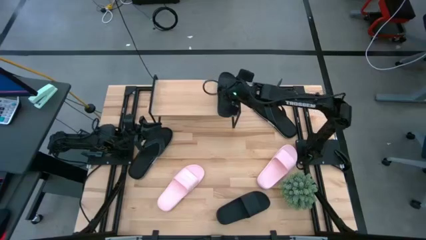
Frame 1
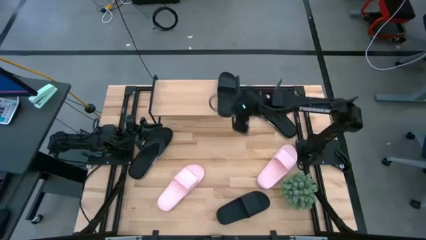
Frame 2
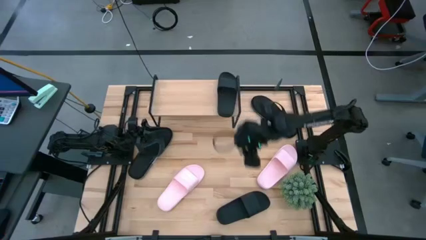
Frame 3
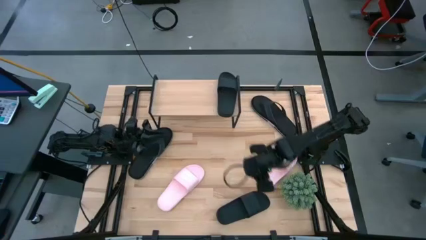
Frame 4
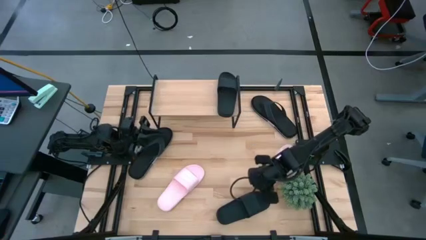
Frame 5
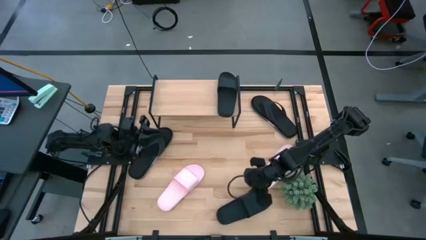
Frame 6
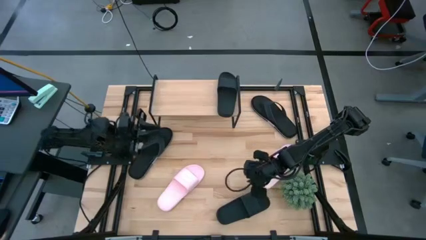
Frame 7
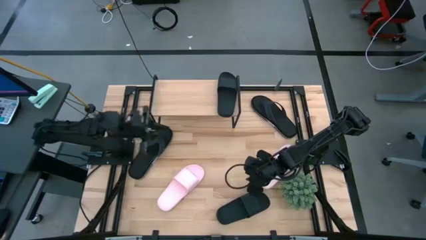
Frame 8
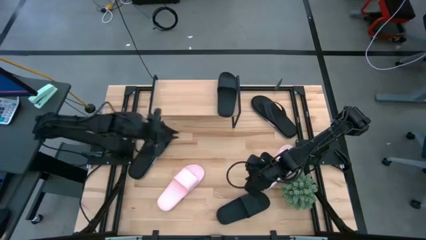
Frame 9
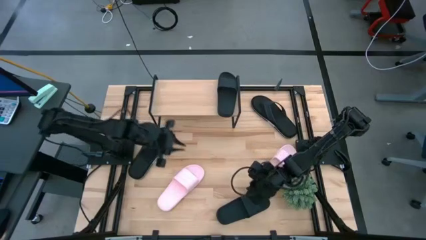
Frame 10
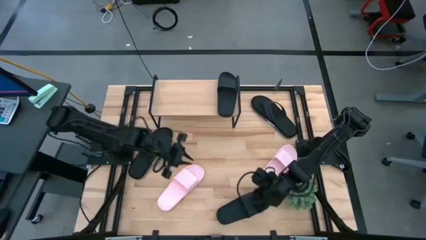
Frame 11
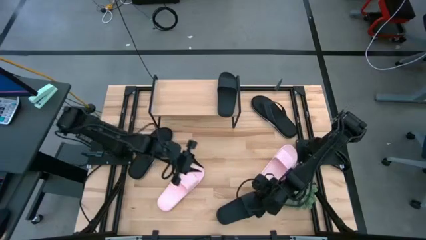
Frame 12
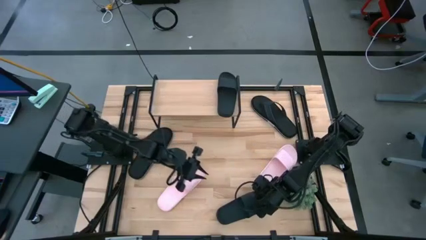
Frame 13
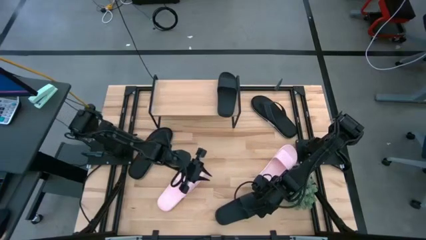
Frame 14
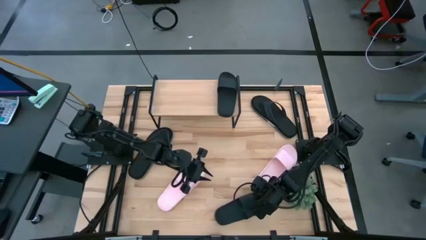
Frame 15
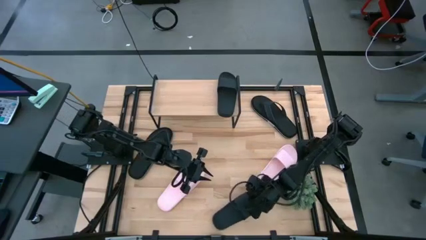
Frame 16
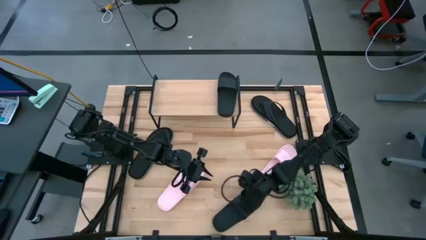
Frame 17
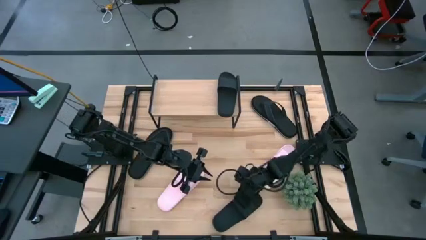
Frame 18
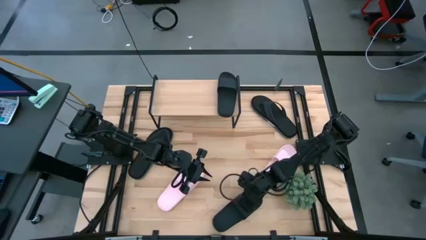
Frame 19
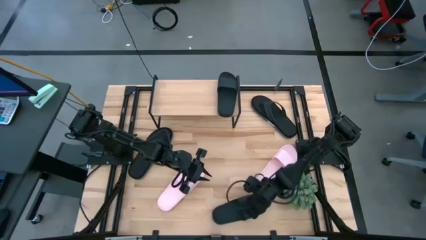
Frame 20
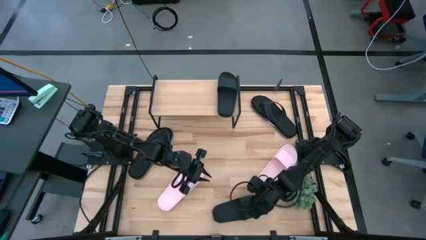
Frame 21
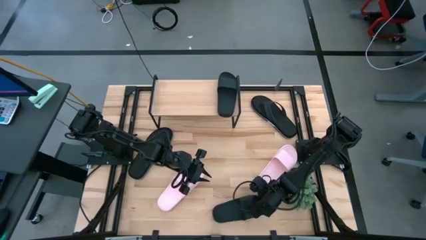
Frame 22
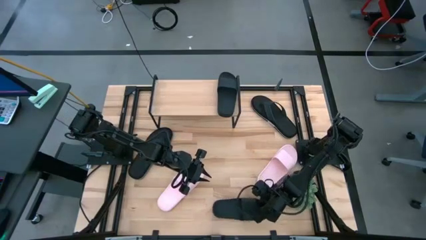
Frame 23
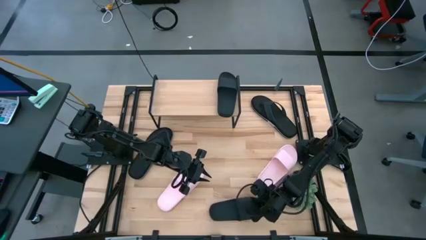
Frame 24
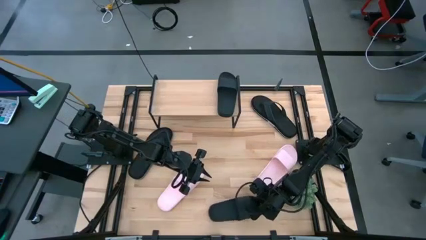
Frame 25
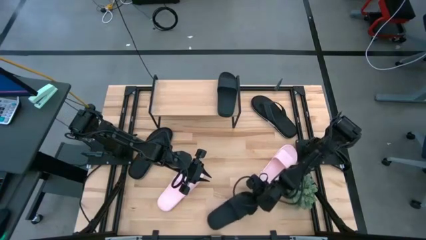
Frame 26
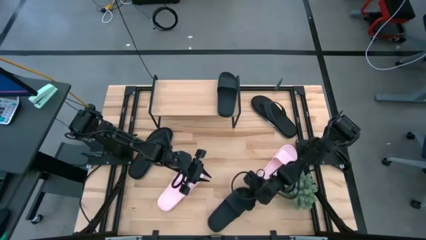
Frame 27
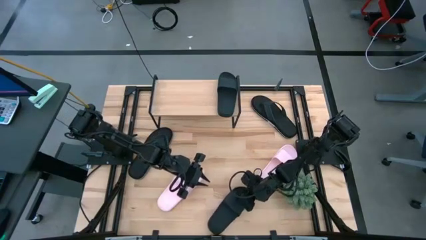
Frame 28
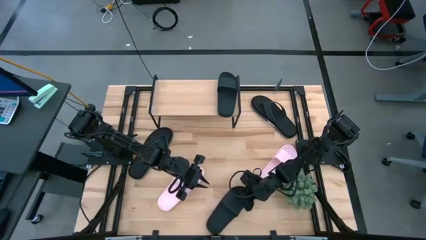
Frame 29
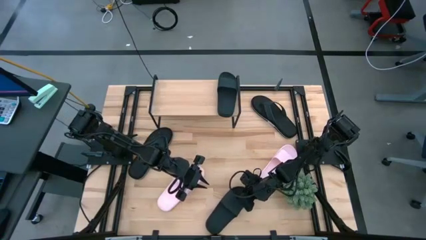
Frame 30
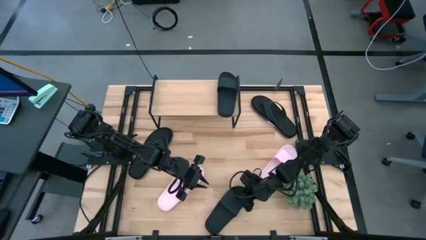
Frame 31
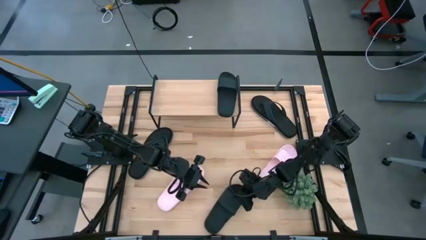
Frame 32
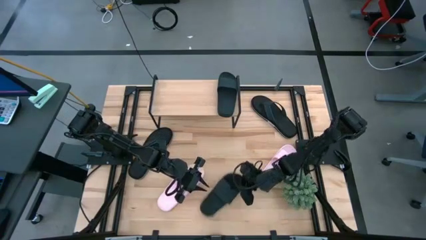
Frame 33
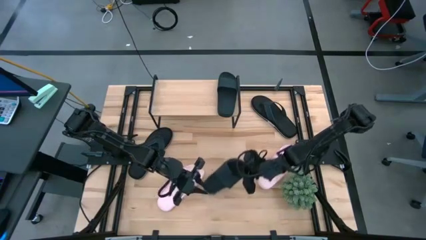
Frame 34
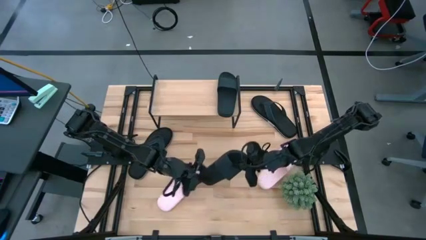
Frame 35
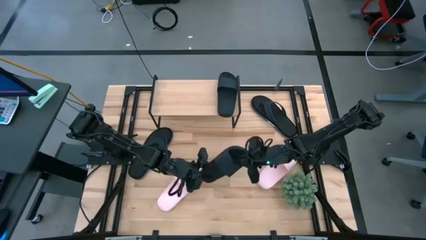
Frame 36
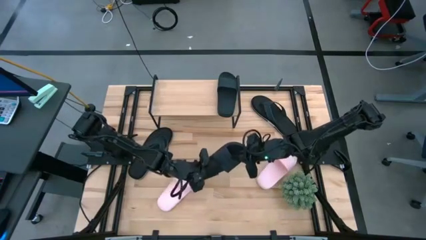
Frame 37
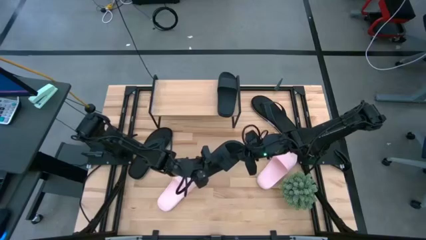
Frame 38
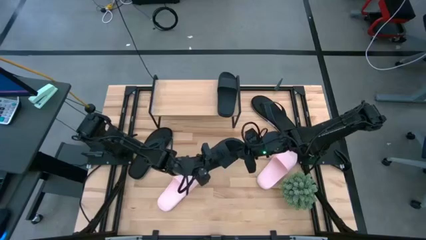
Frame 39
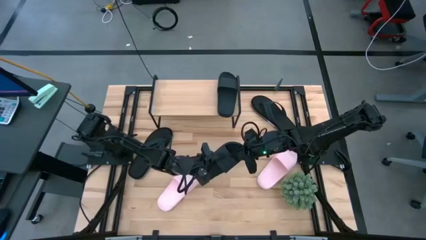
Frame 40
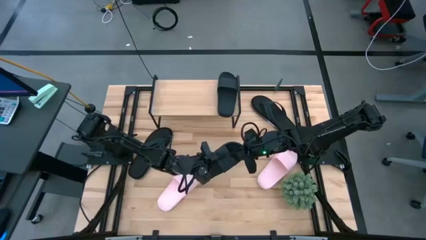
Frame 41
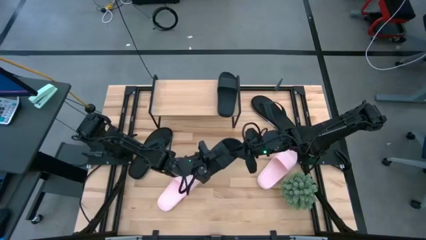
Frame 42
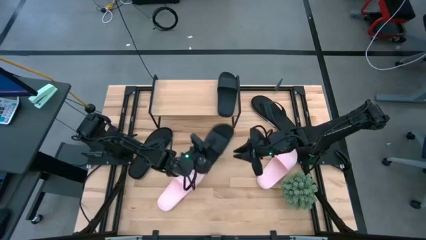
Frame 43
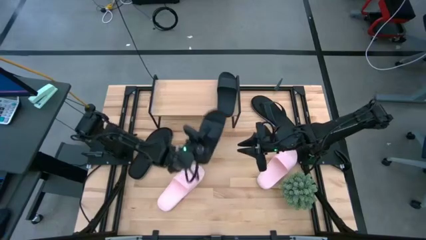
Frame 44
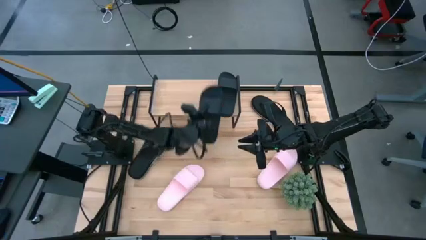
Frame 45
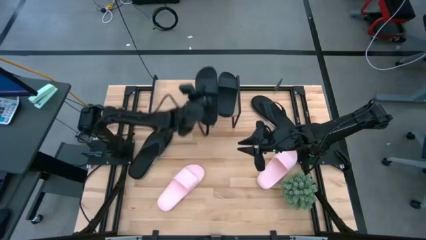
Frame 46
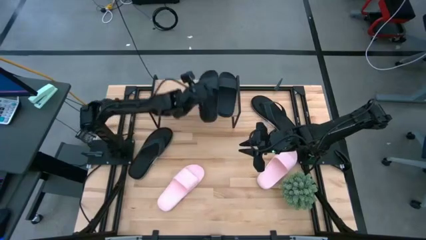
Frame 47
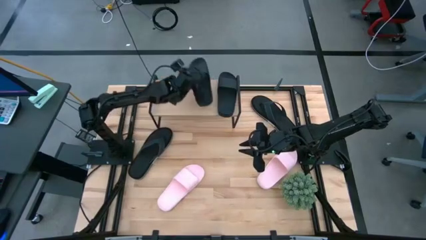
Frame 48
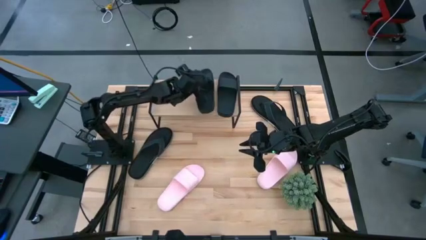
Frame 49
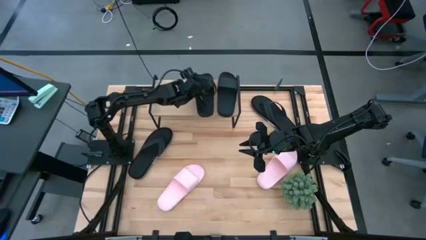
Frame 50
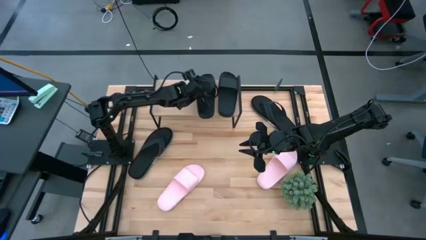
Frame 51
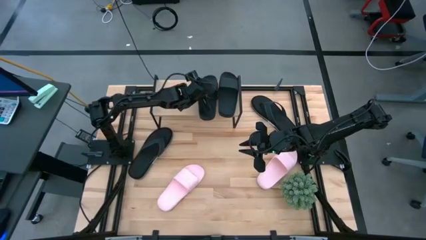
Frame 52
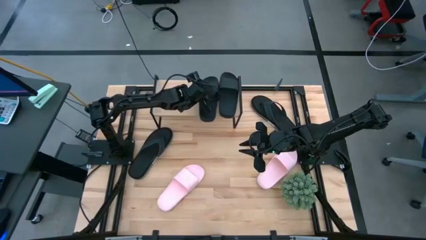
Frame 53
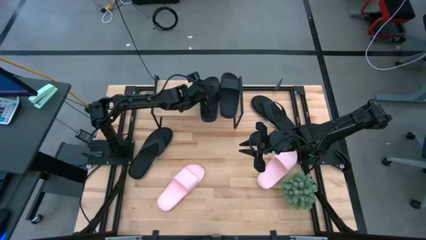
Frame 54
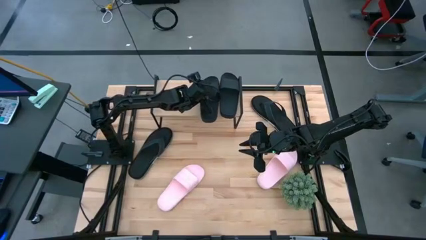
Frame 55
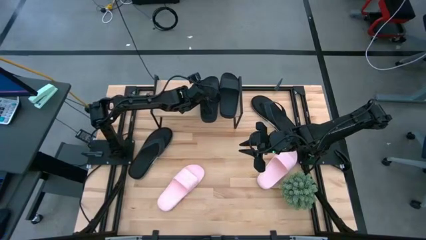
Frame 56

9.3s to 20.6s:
Task: Pick and place slides into the shelf
Put the black slide on the shelf

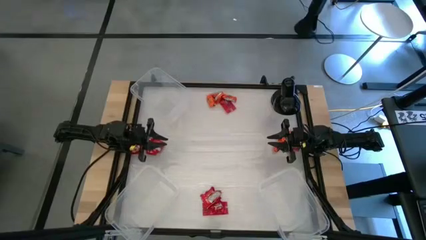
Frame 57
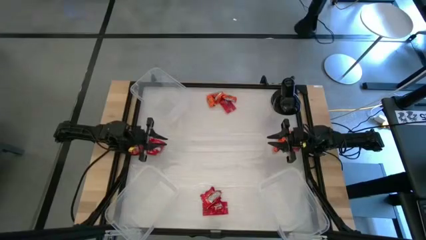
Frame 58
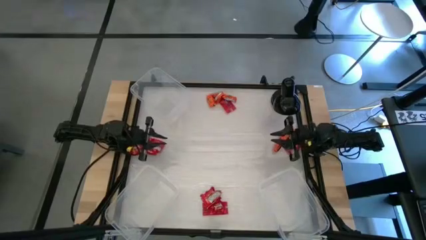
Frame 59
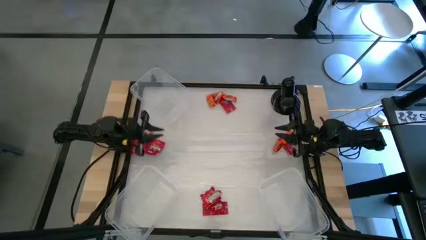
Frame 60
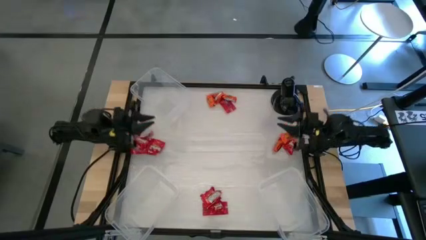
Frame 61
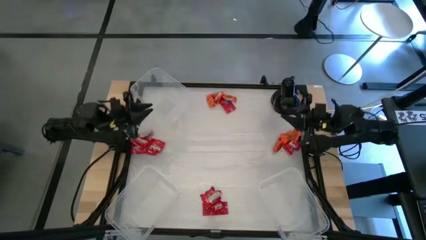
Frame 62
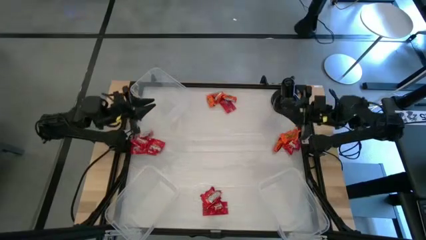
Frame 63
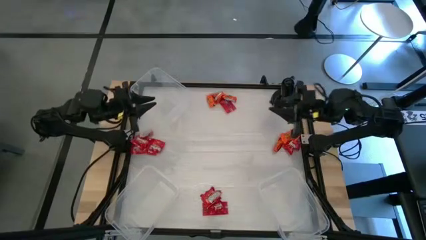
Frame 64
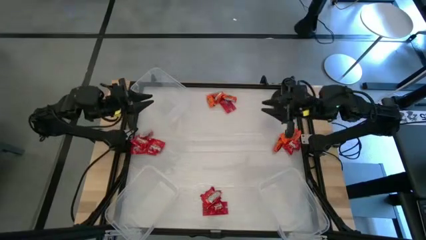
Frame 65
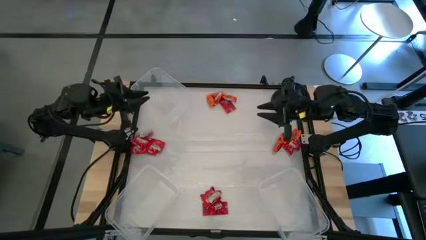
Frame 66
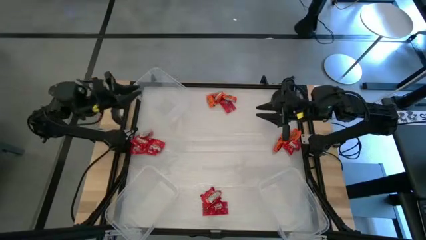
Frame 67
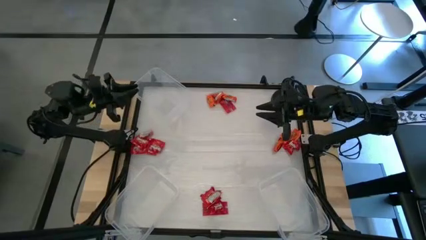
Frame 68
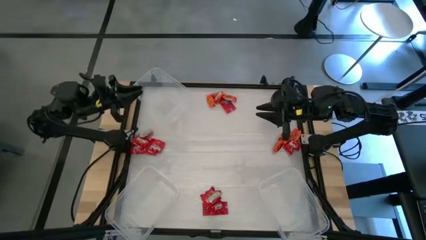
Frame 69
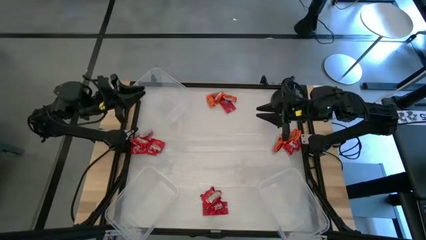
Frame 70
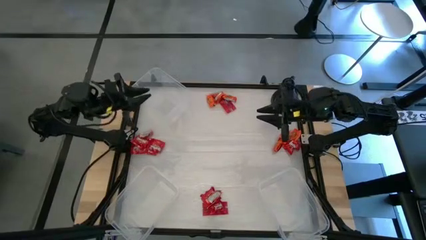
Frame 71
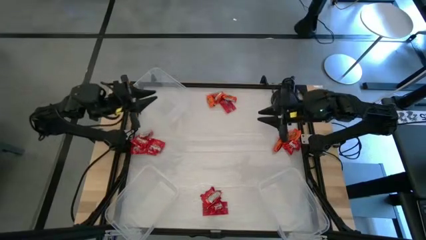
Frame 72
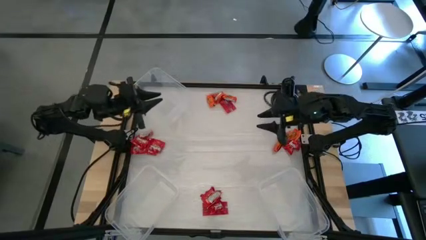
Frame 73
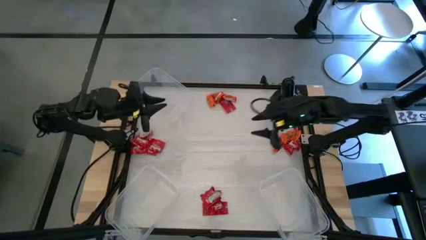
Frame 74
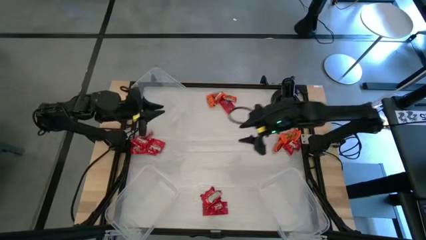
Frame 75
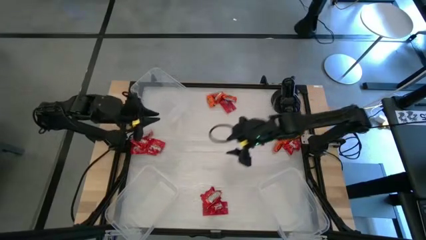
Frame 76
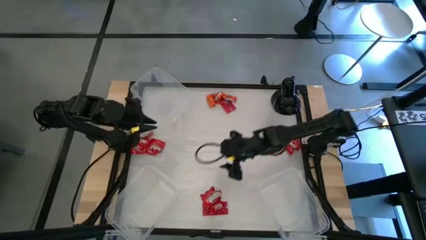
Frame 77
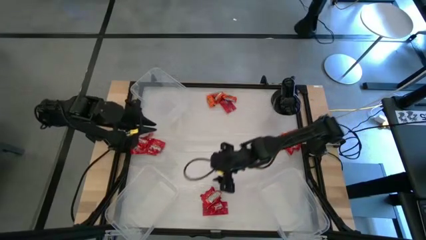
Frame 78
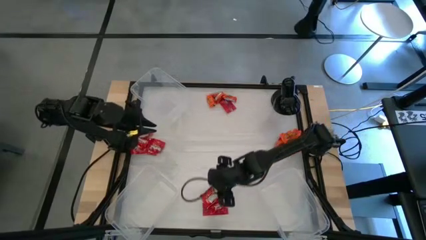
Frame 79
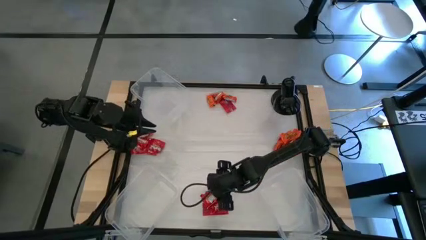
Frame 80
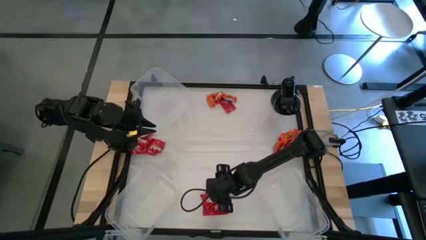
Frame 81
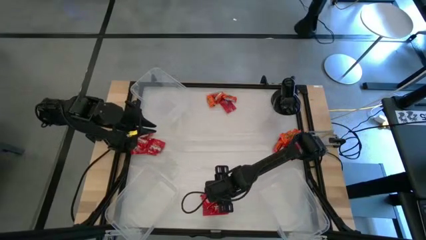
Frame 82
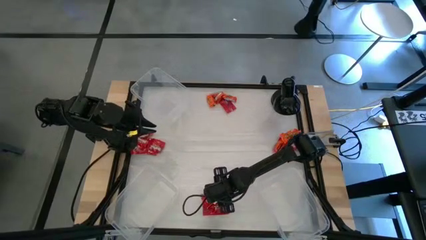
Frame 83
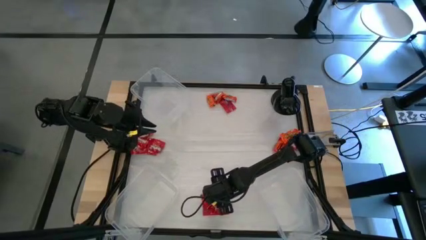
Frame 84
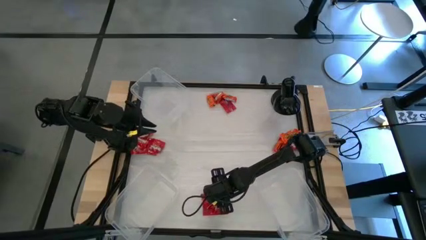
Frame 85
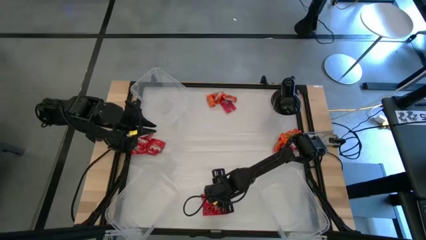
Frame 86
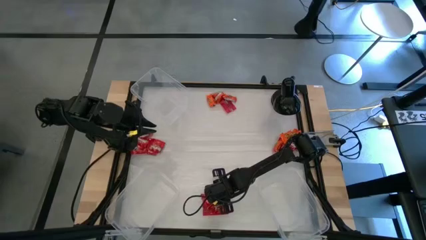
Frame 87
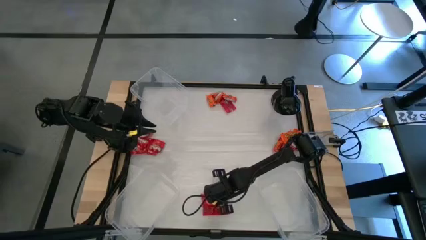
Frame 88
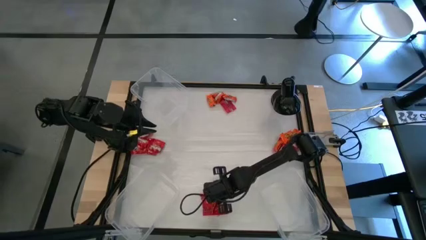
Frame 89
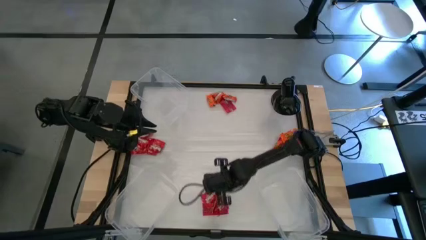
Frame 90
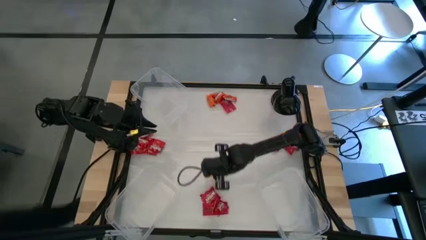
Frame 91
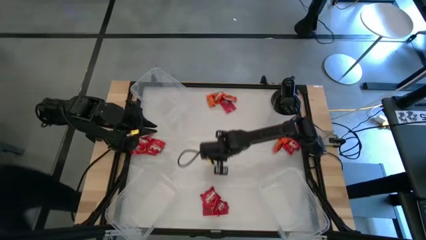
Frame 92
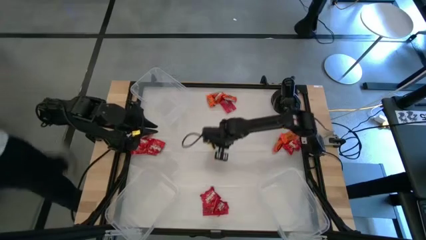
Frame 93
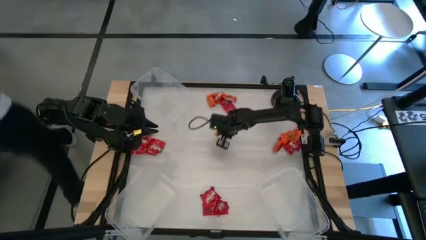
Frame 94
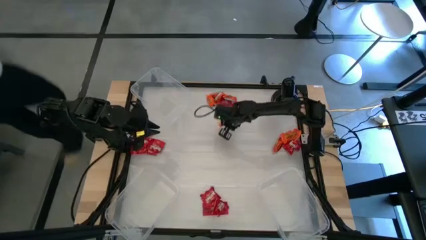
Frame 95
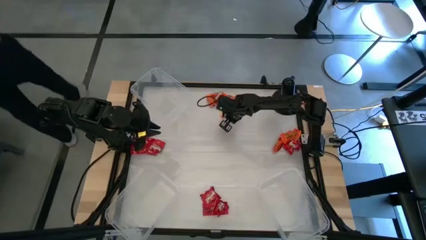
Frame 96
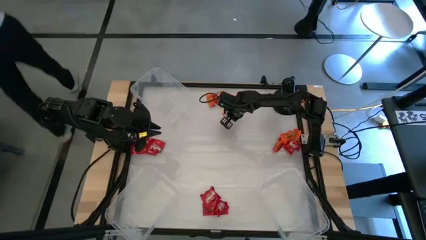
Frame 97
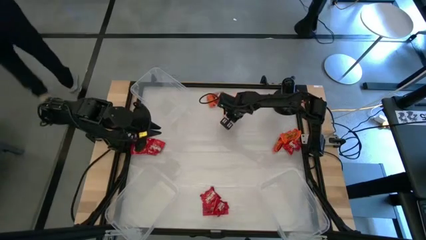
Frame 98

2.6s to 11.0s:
Task: Sort candy
Move the orange candy to the top center of the table
